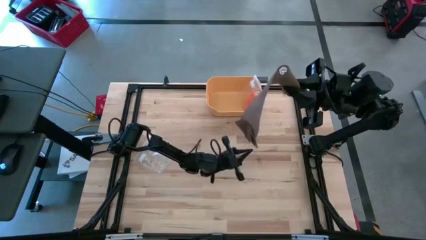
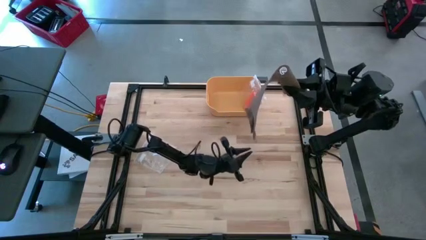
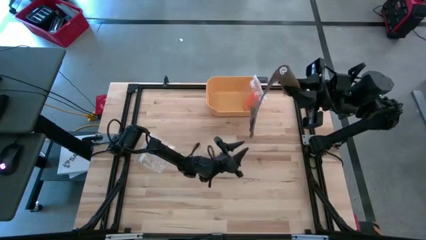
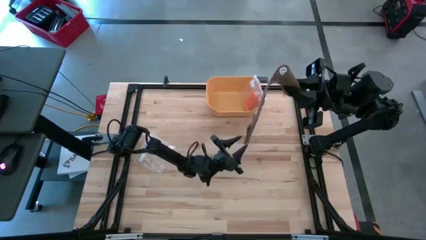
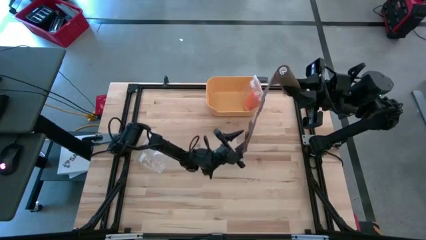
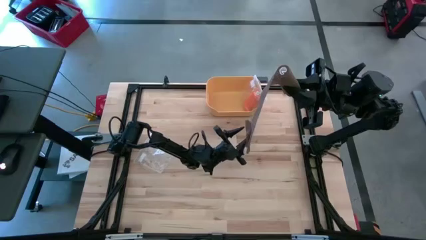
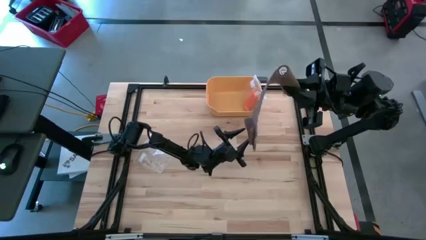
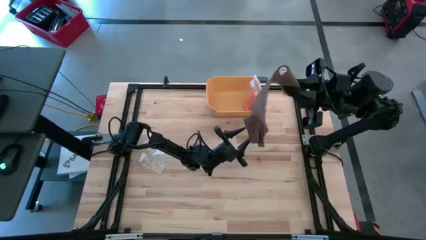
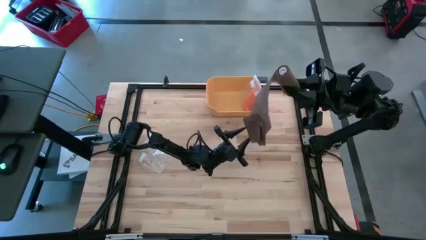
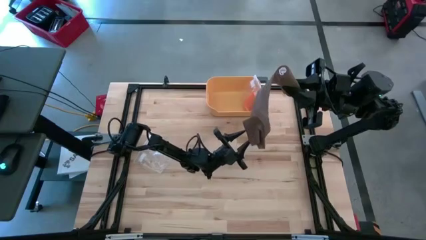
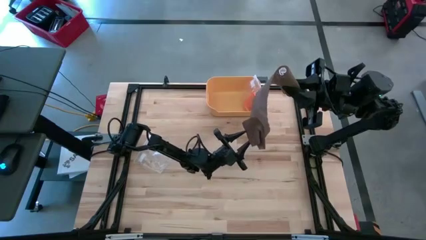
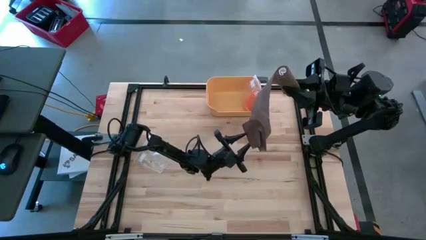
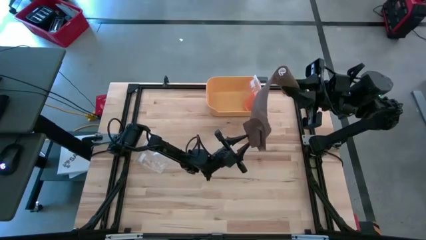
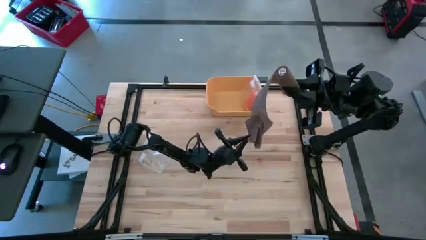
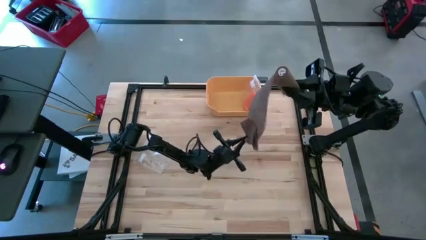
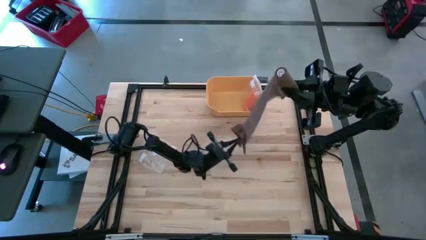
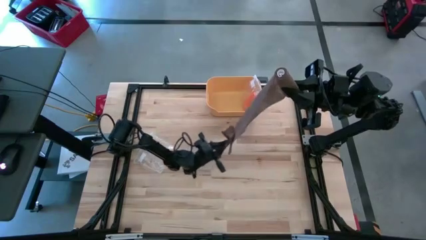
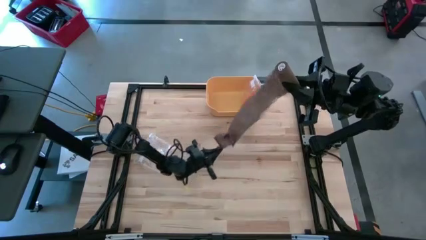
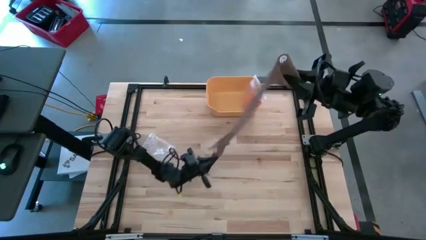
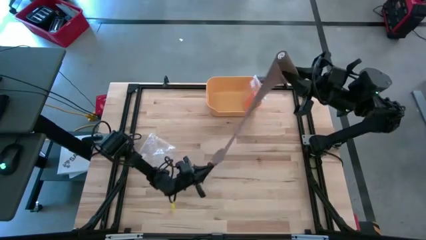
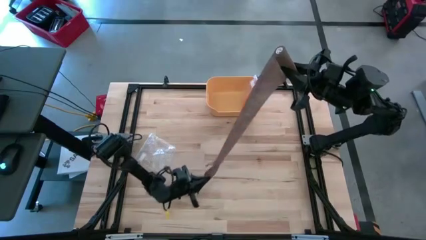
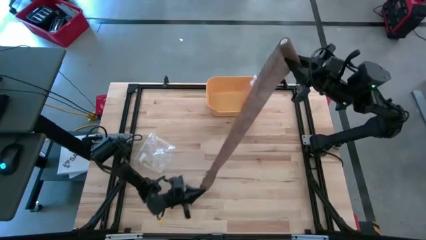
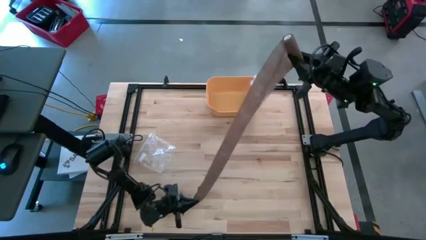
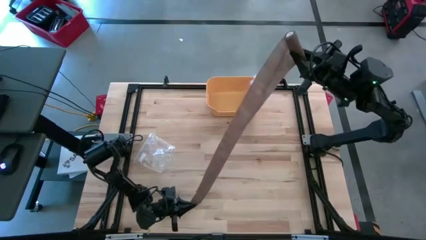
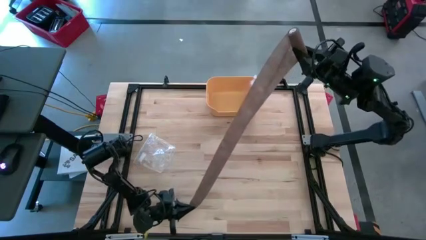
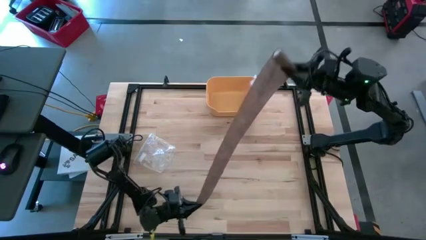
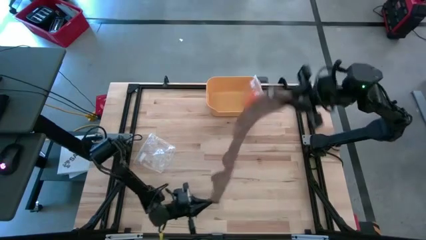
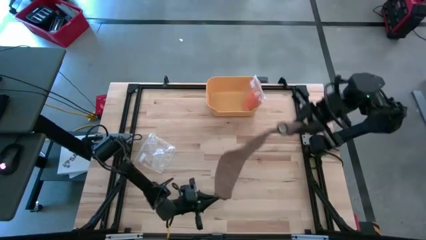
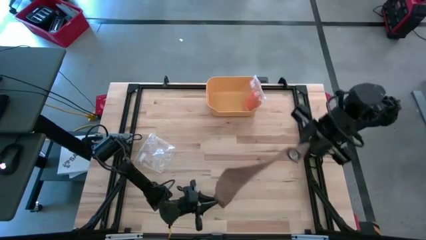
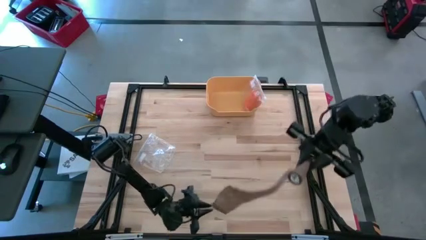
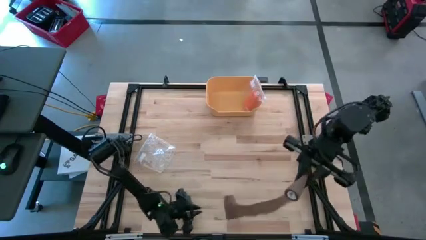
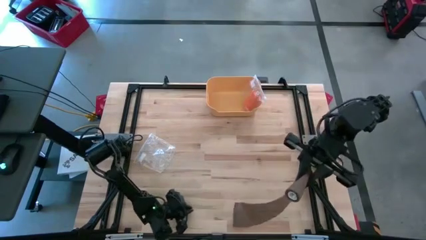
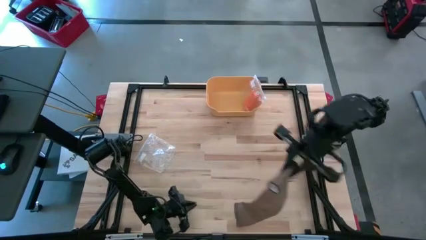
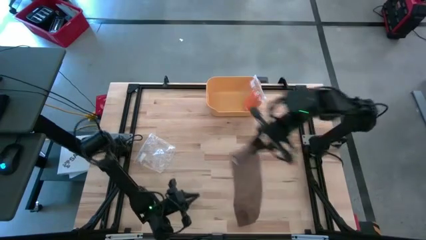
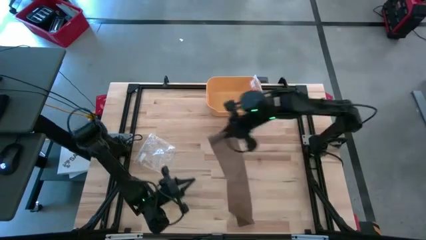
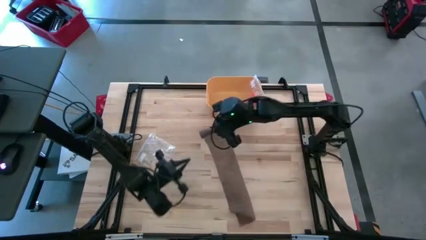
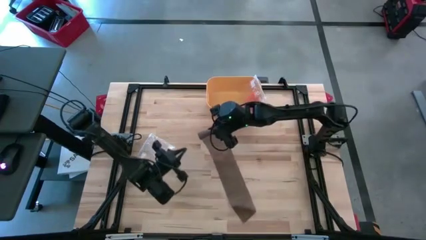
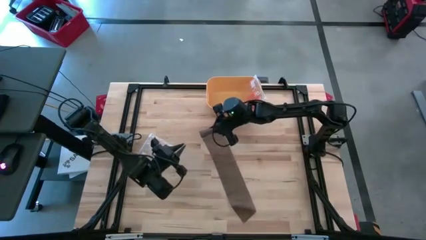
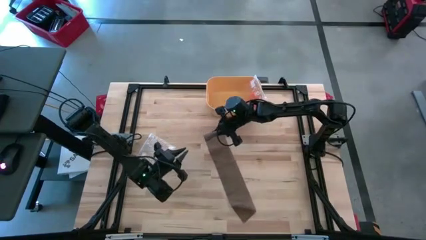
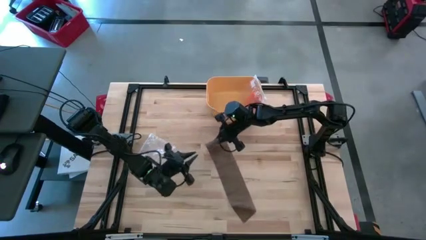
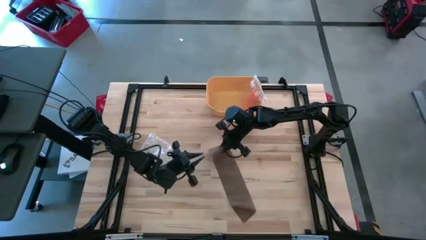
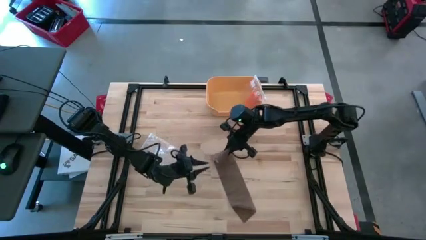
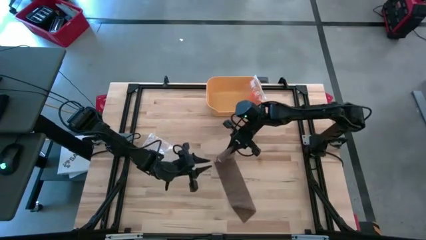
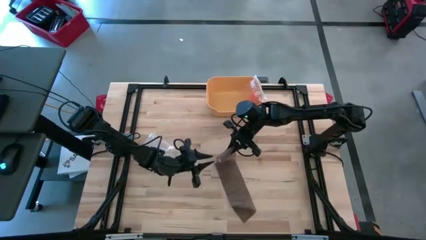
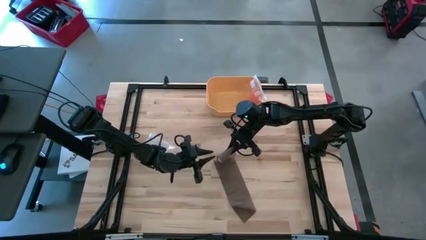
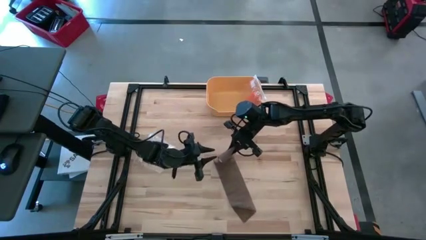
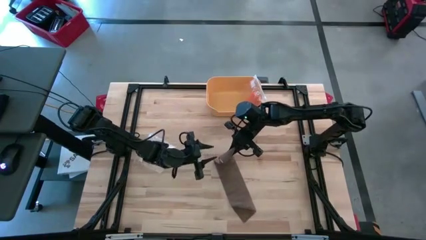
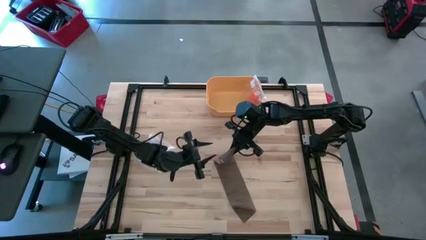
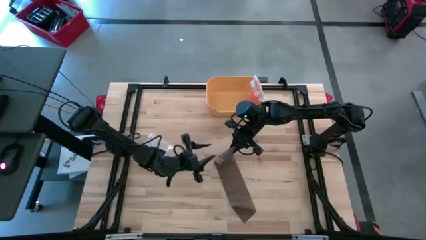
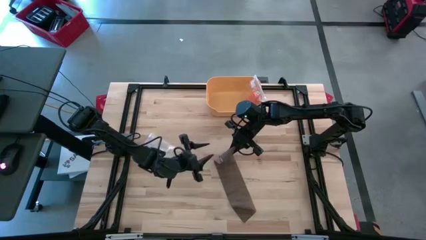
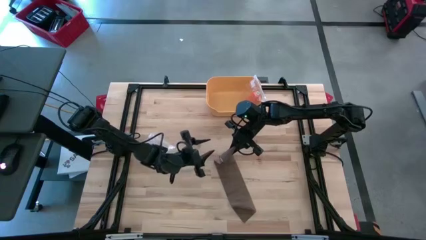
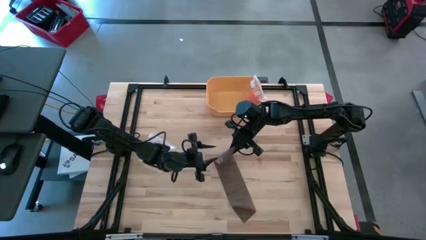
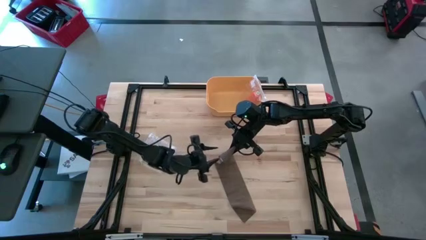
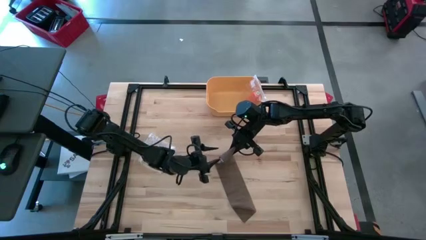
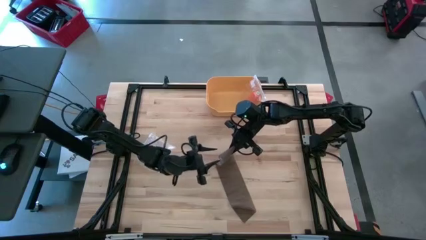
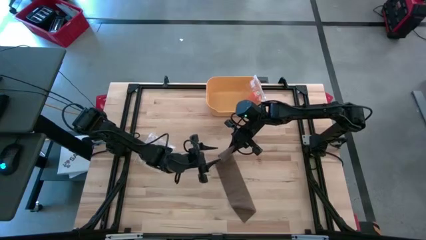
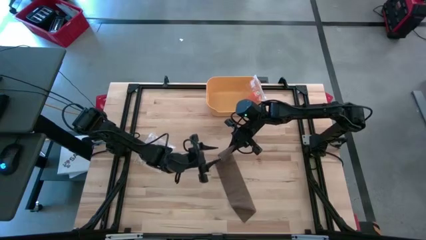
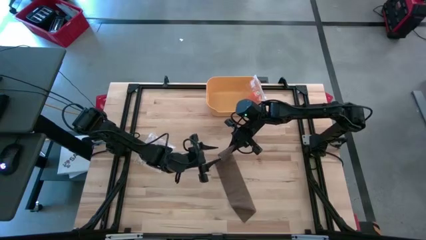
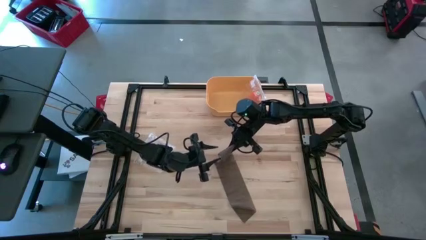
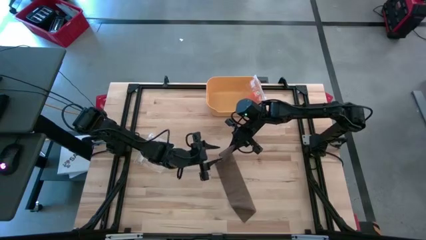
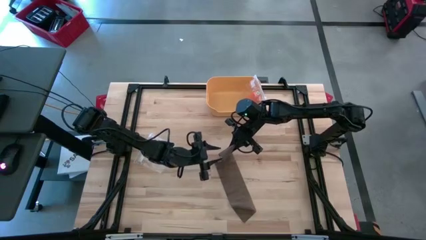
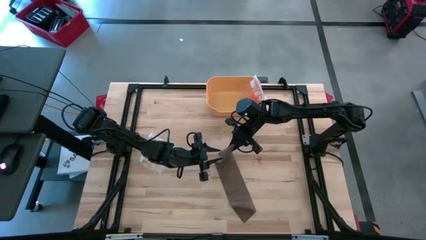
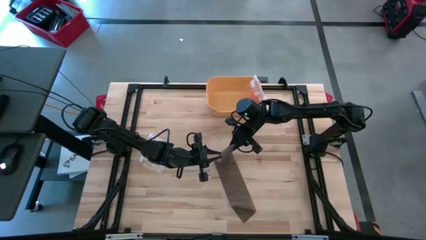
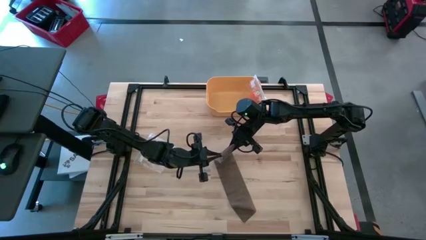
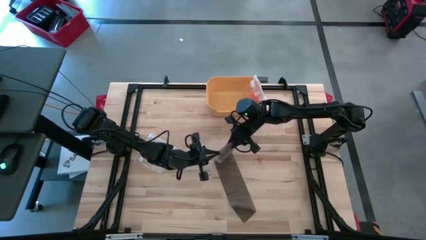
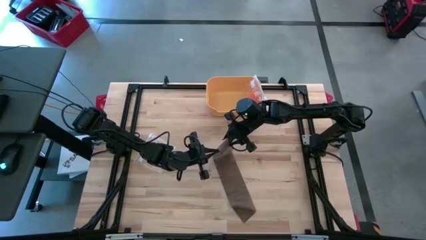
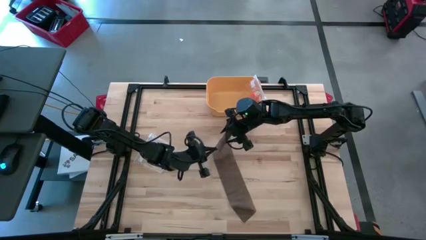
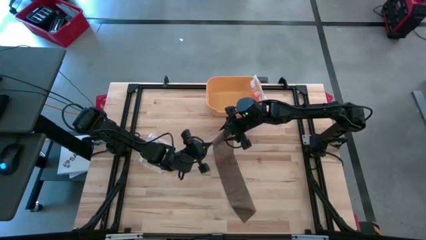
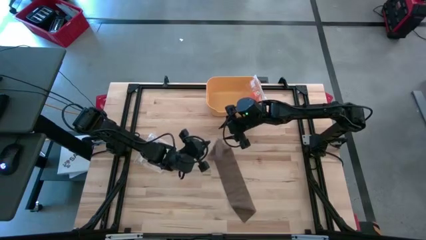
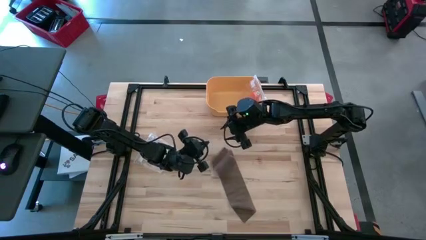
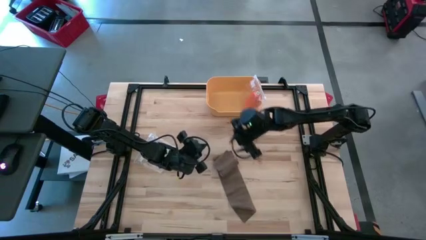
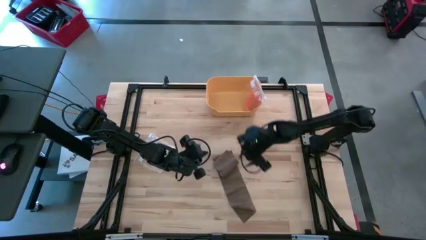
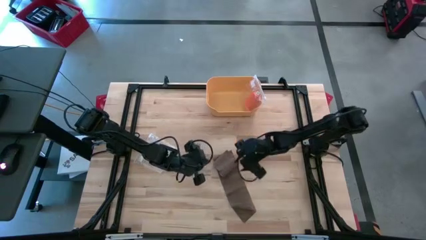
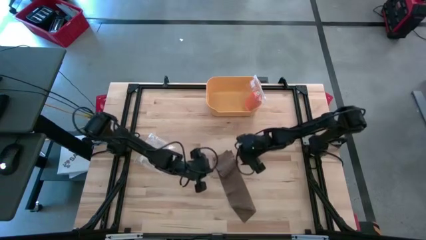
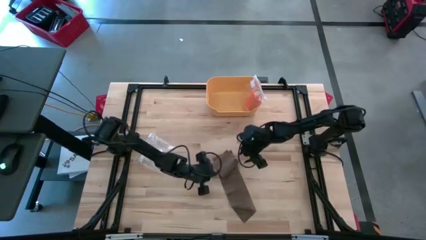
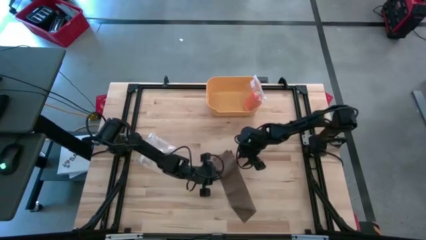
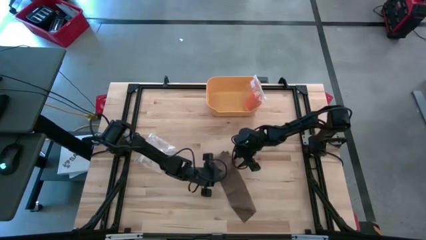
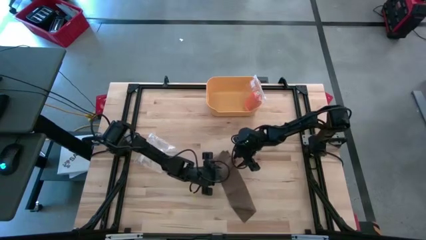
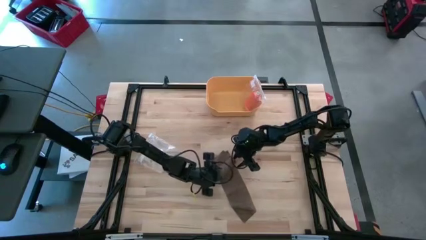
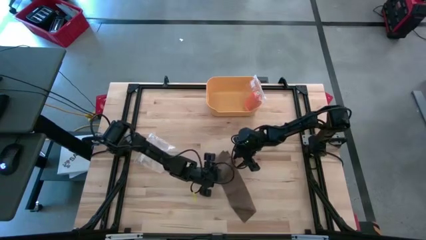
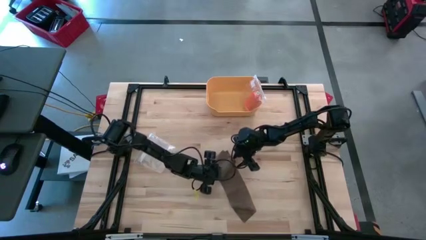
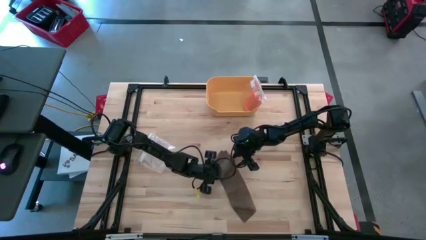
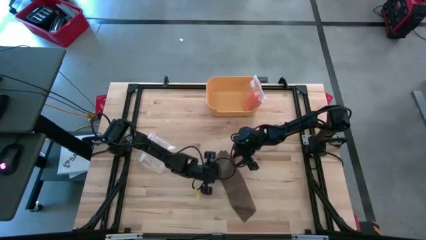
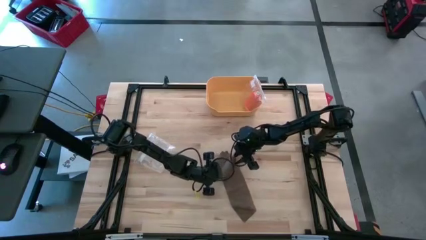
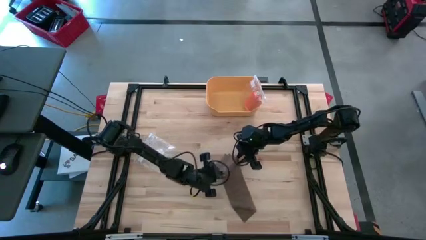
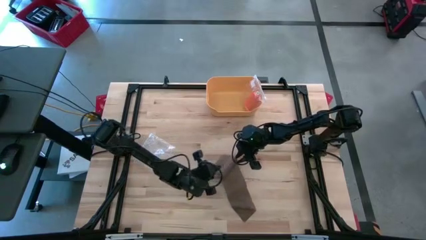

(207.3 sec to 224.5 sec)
Task: Roll bandage
Roll the brown bandage
